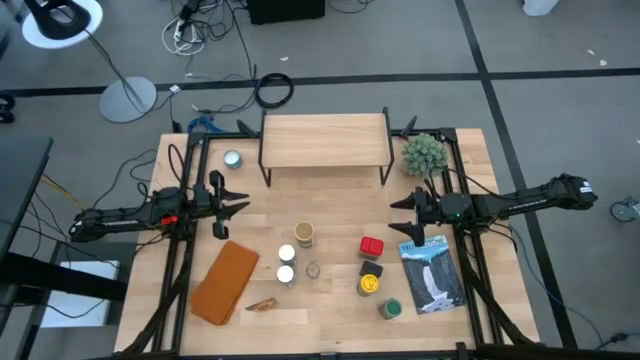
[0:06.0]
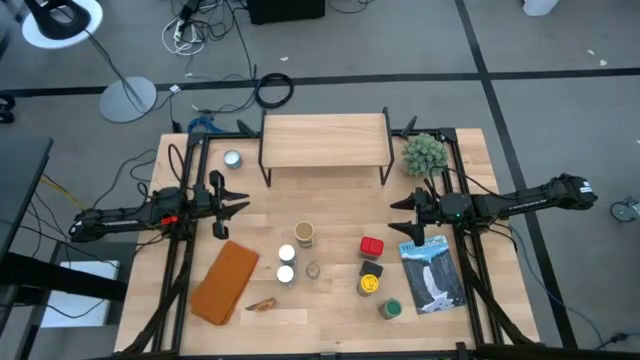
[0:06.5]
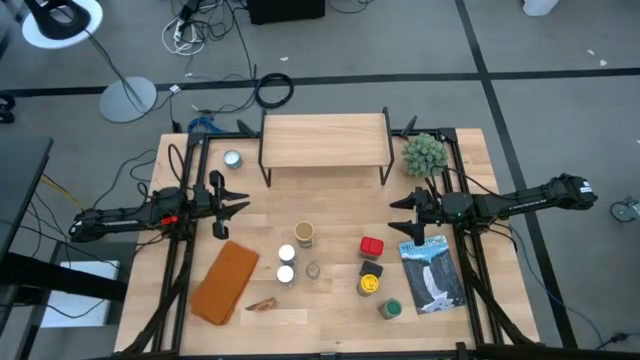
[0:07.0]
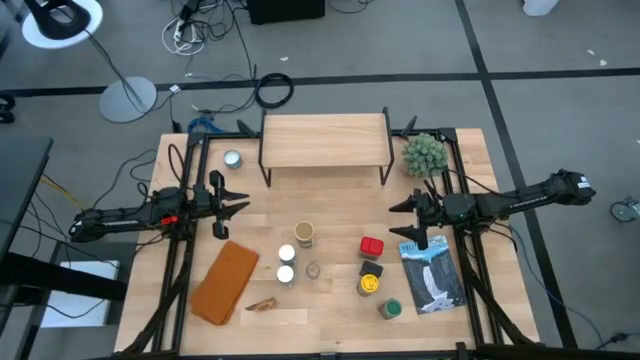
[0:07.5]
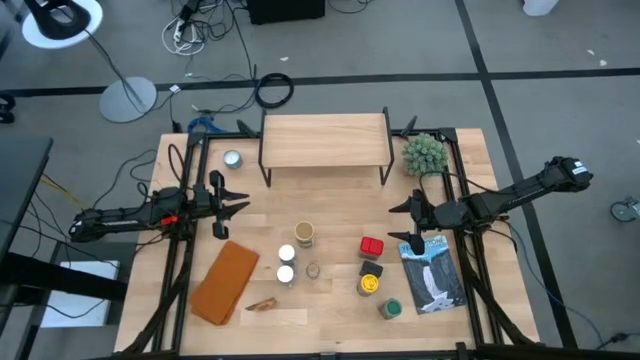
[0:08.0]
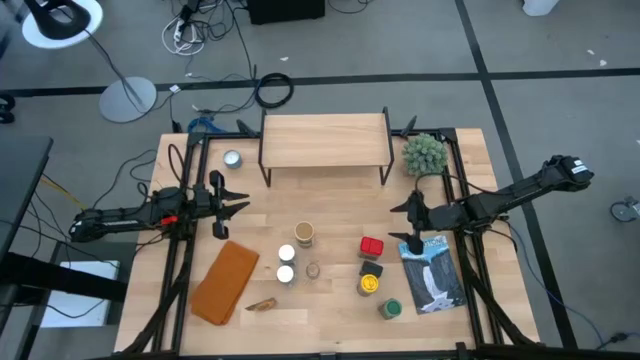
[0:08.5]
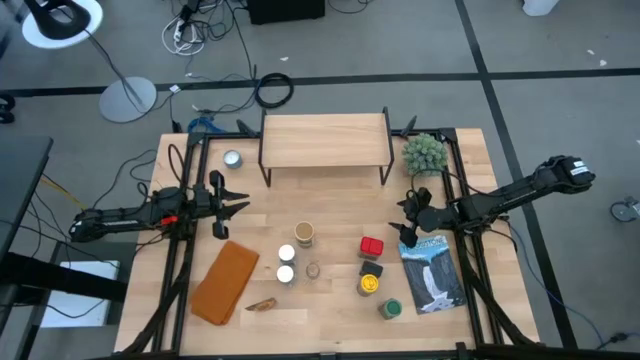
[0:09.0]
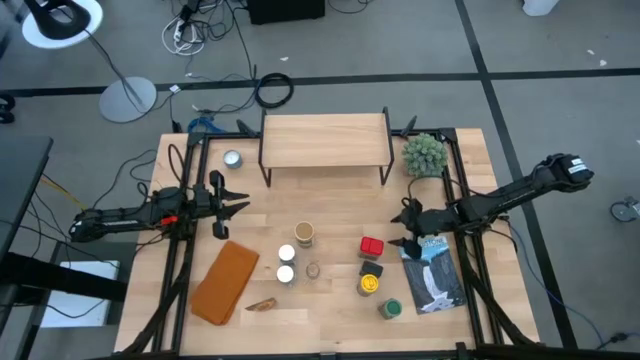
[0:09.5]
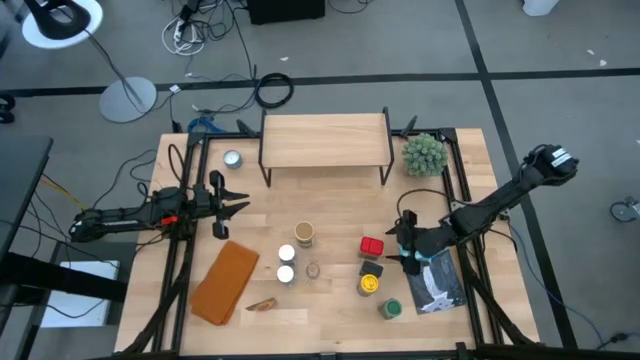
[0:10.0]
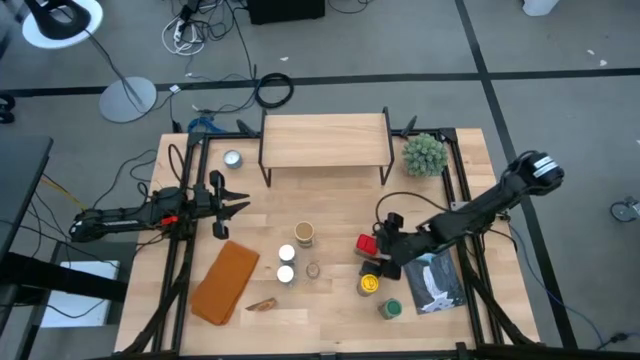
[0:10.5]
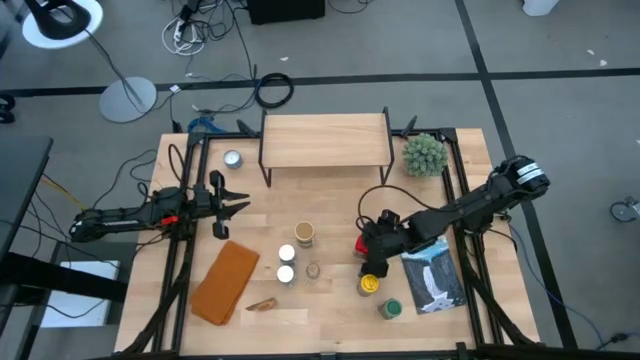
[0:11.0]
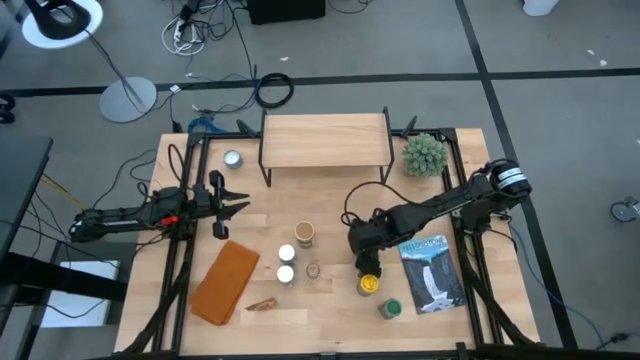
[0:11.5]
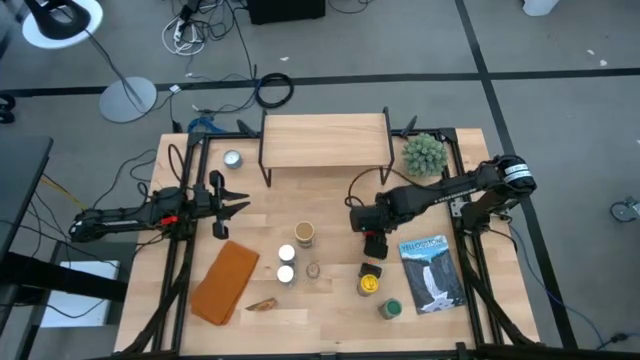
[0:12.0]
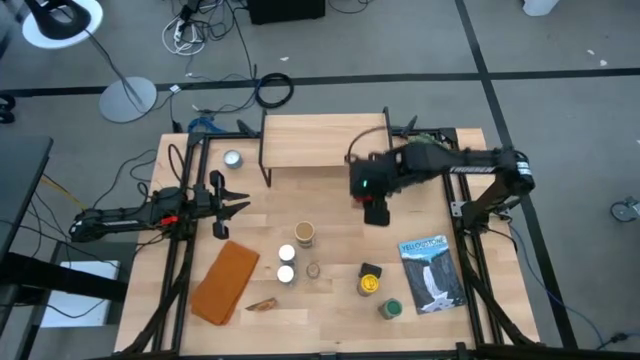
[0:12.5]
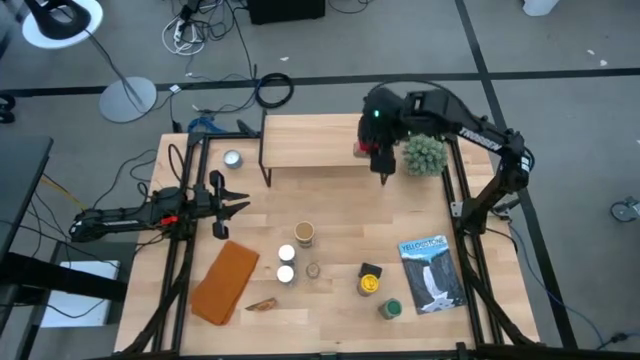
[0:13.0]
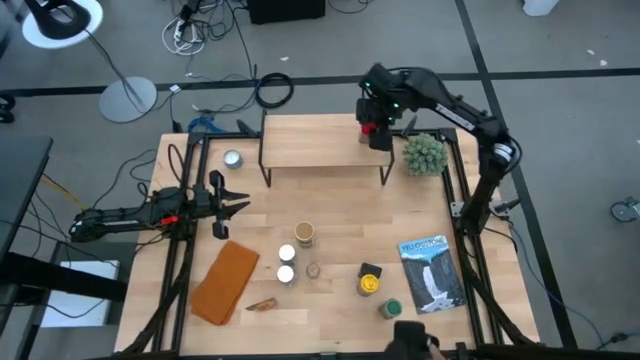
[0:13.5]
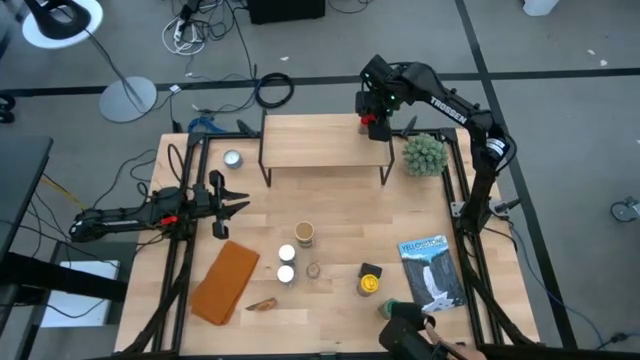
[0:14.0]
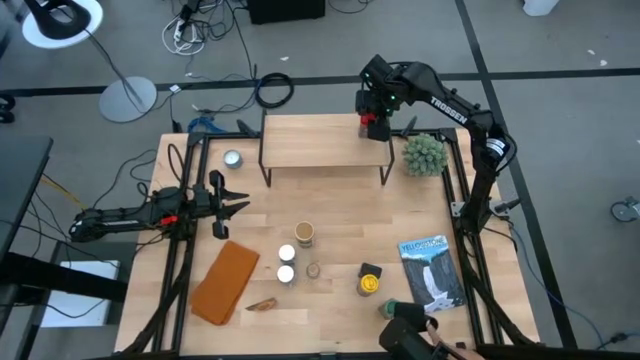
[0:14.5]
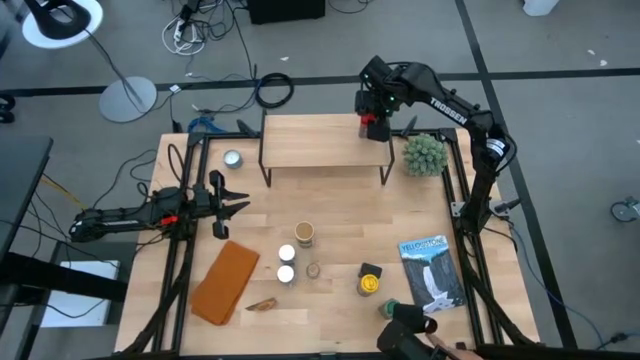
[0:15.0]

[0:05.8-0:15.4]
Task: Shelf spices
Put the red seasoning can on the shelf

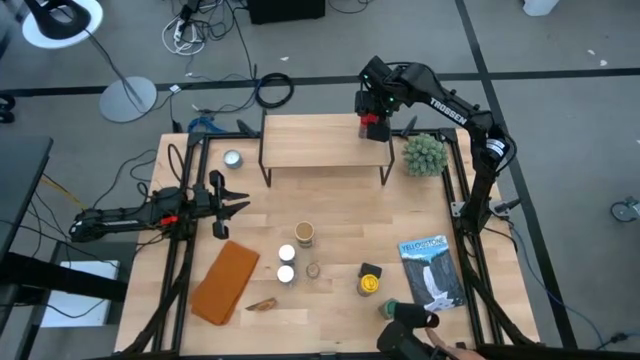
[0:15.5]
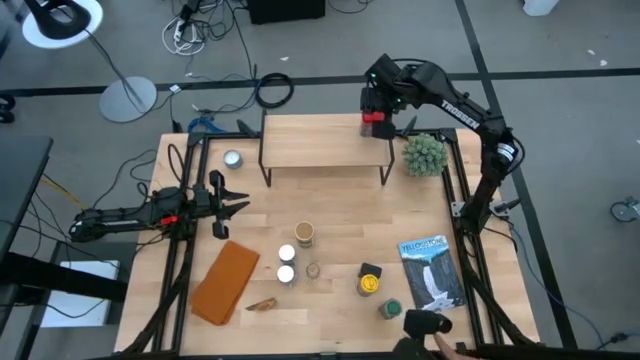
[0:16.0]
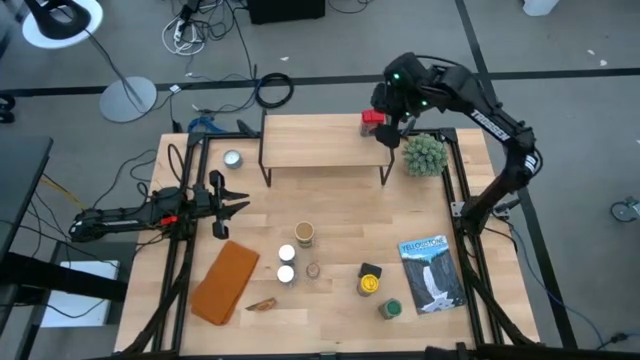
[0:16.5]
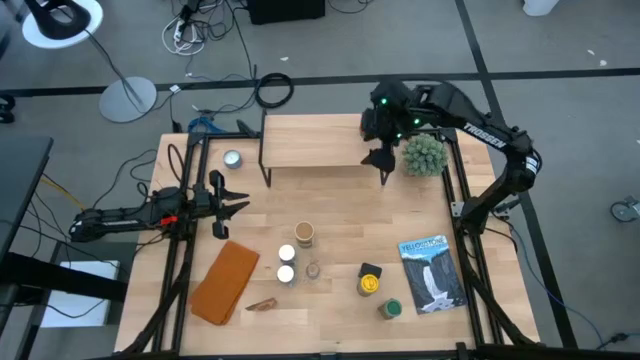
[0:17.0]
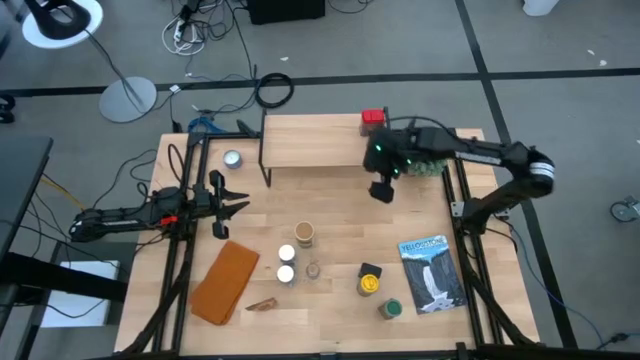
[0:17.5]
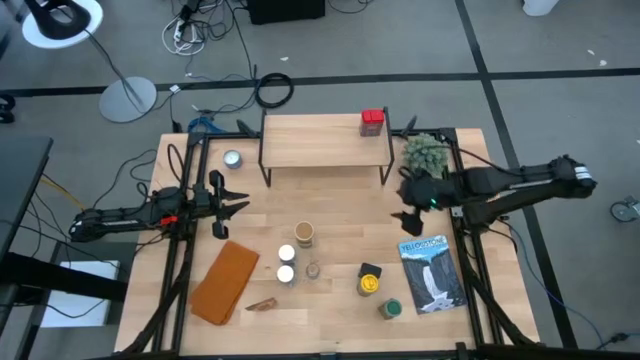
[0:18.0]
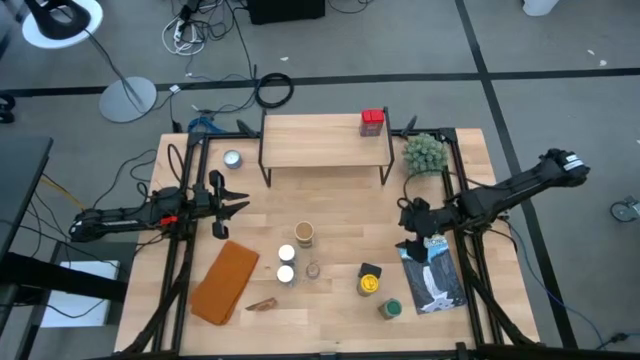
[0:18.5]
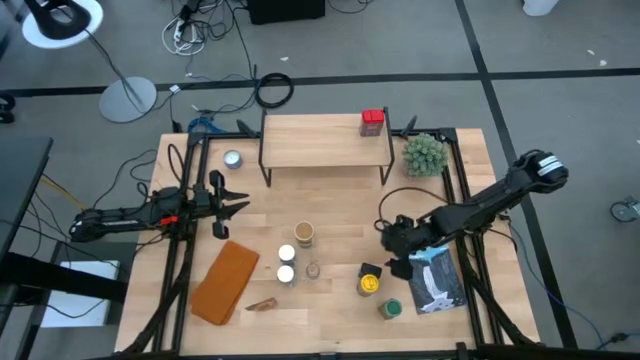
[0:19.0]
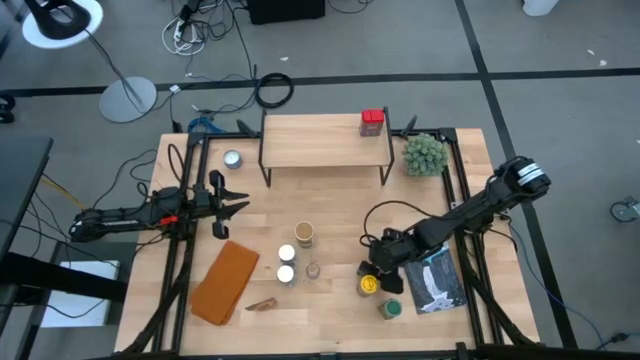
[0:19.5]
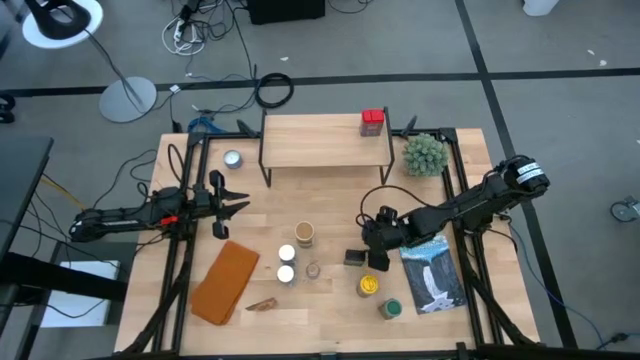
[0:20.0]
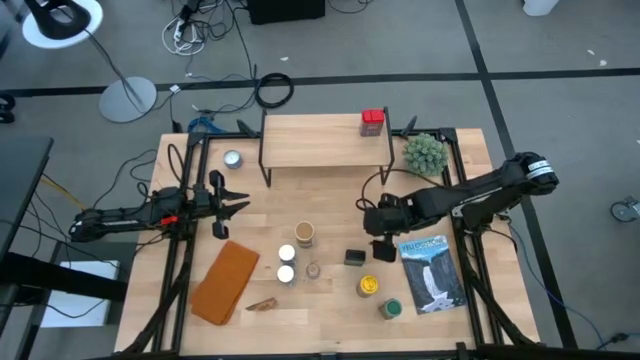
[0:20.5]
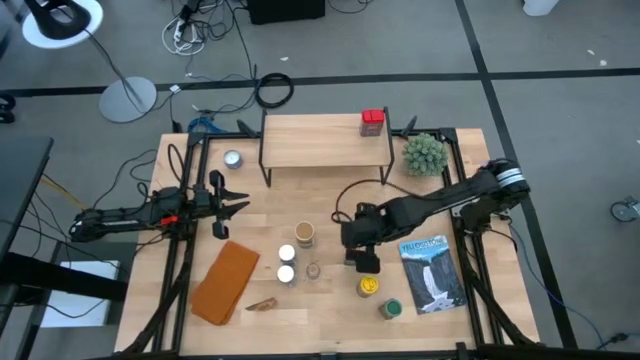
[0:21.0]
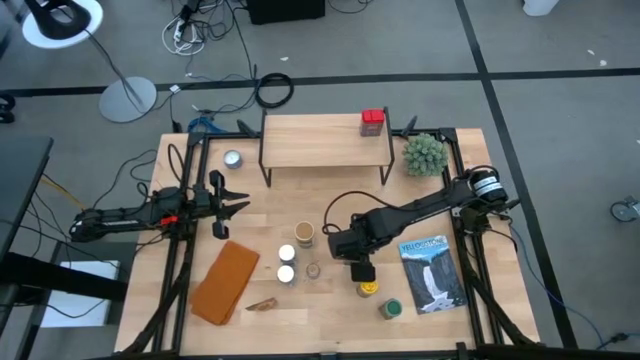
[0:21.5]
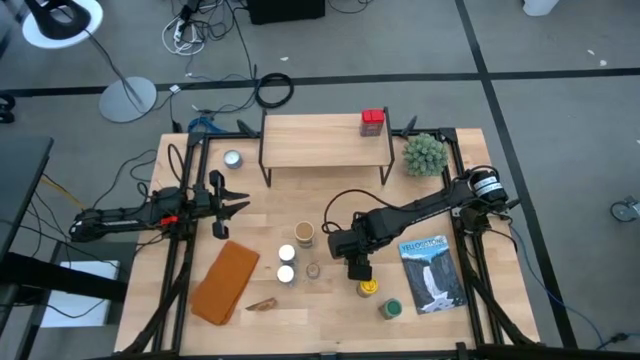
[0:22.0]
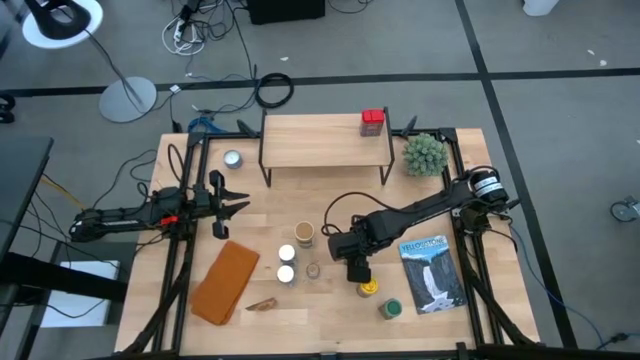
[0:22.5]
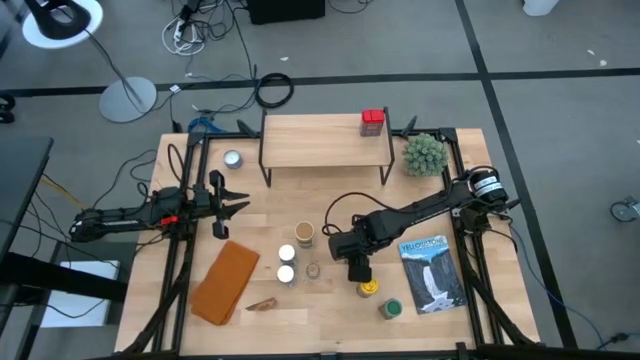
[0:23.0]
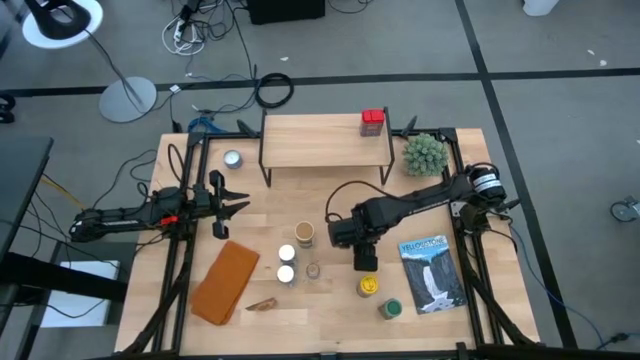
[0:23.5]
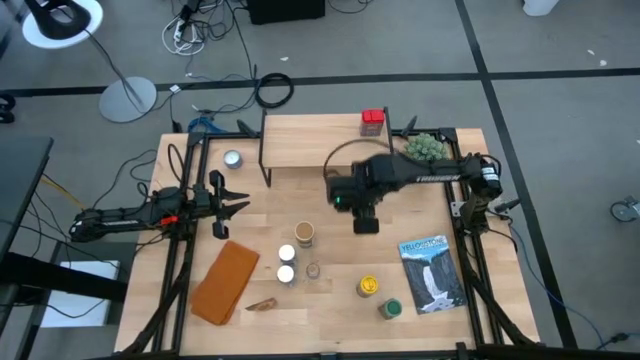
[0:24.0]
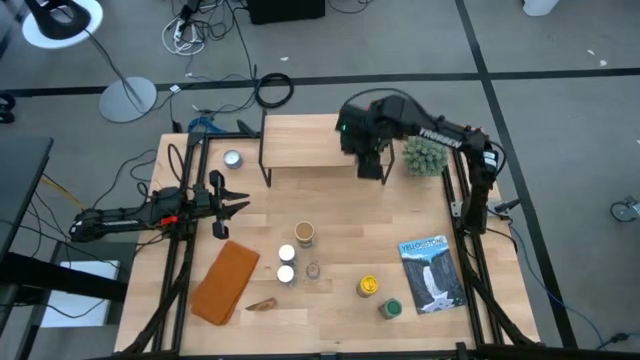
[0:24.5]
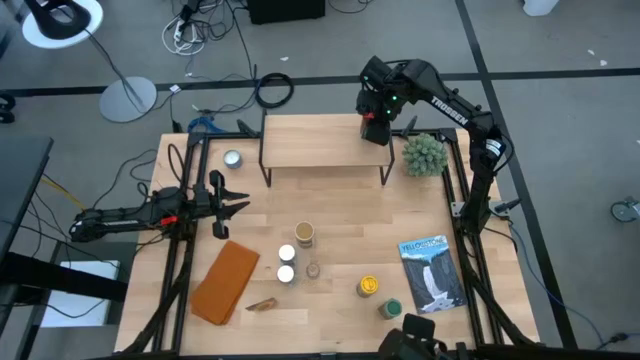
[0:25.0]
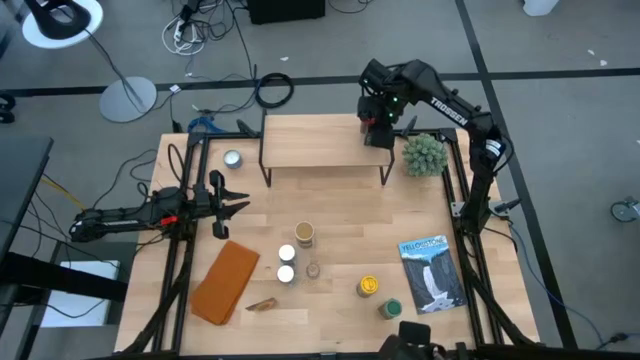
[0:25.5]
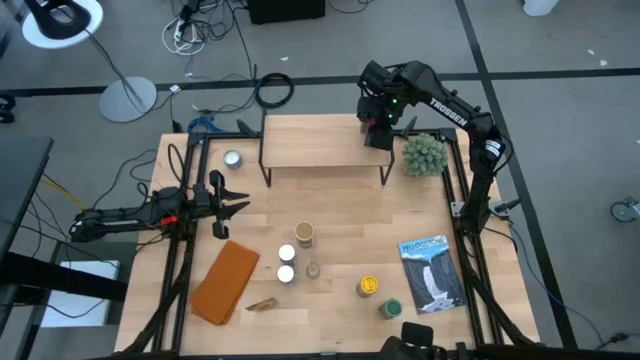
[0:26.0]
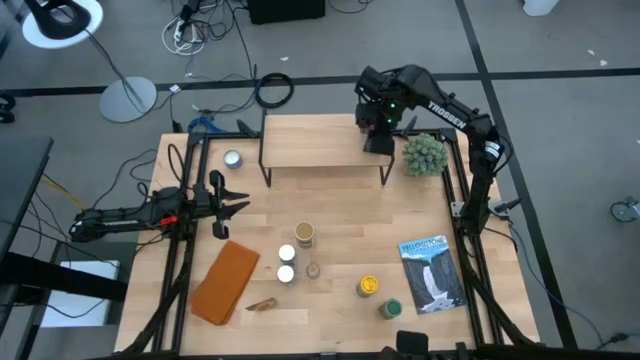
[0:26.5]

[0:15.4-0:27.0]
Put the green seasoning can on the shelf
